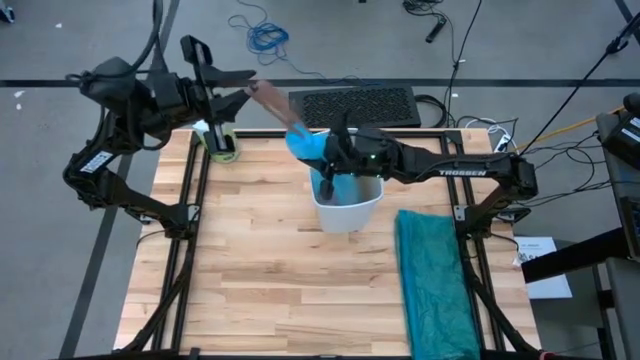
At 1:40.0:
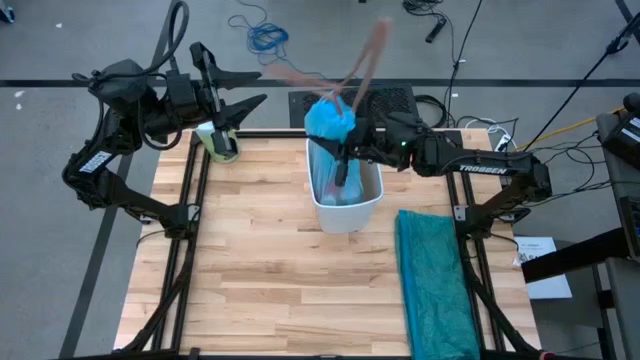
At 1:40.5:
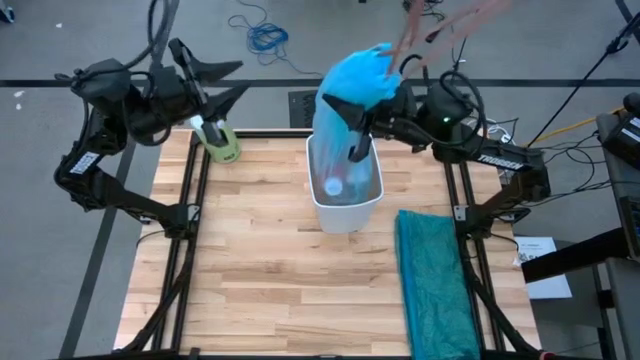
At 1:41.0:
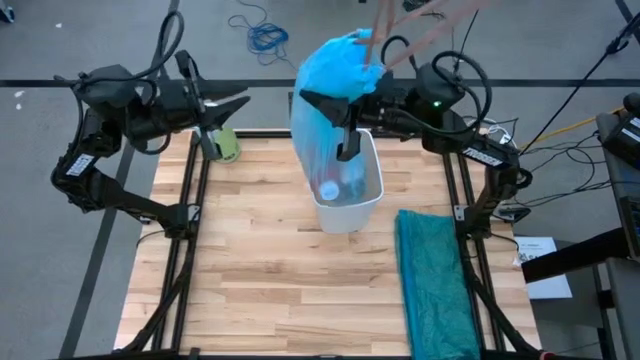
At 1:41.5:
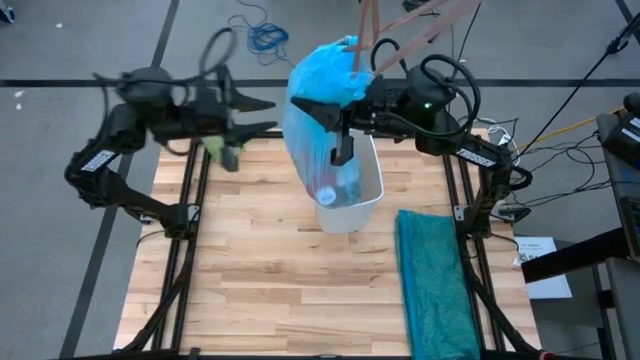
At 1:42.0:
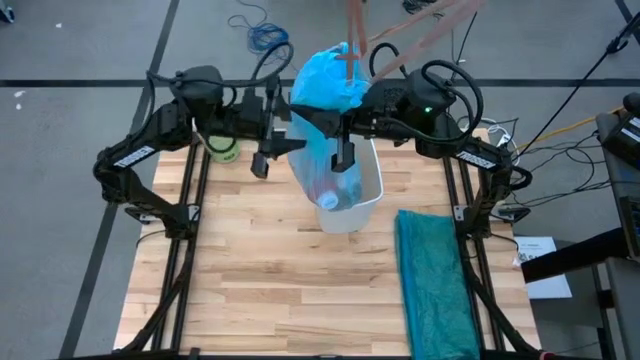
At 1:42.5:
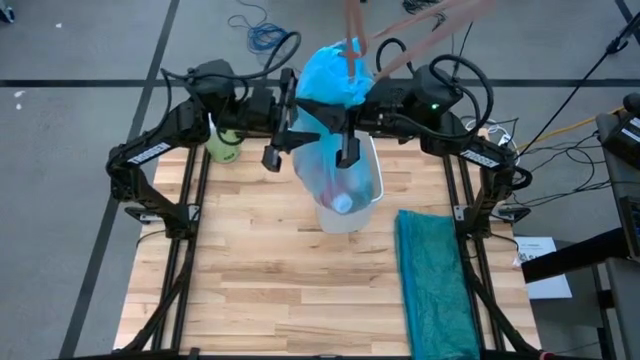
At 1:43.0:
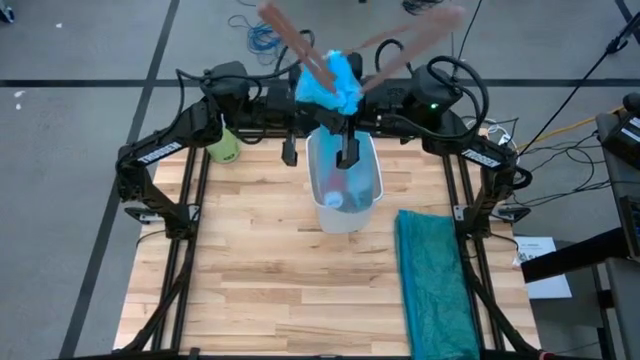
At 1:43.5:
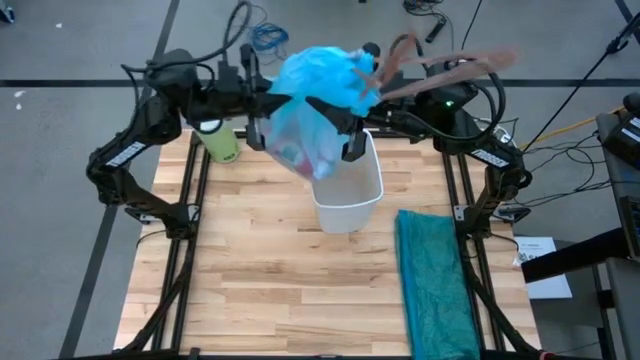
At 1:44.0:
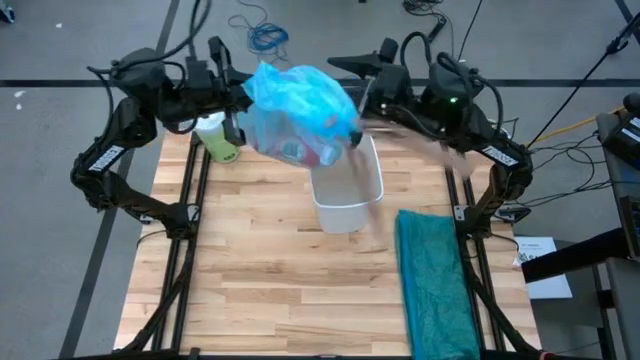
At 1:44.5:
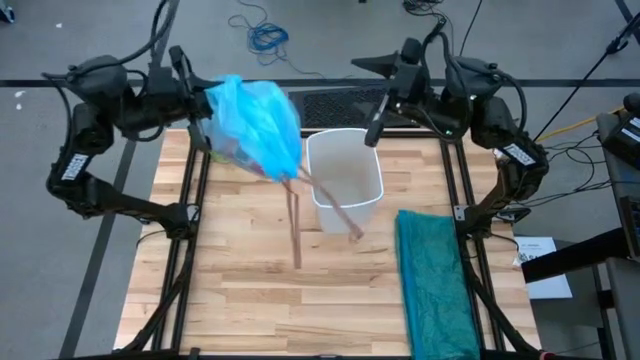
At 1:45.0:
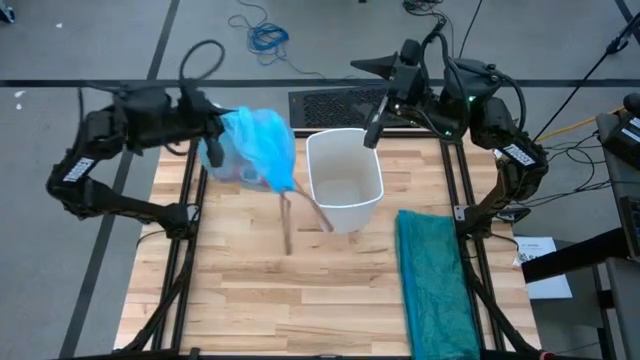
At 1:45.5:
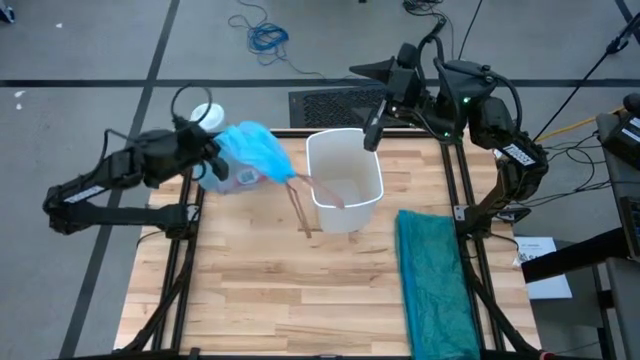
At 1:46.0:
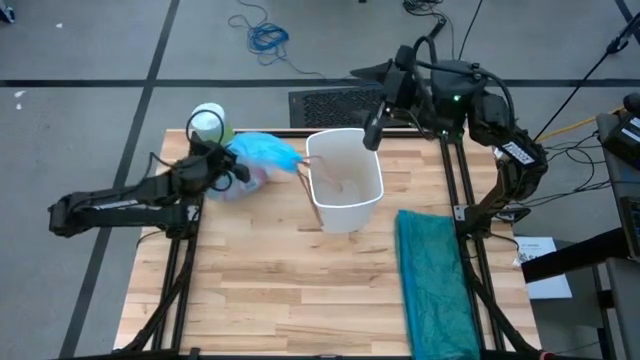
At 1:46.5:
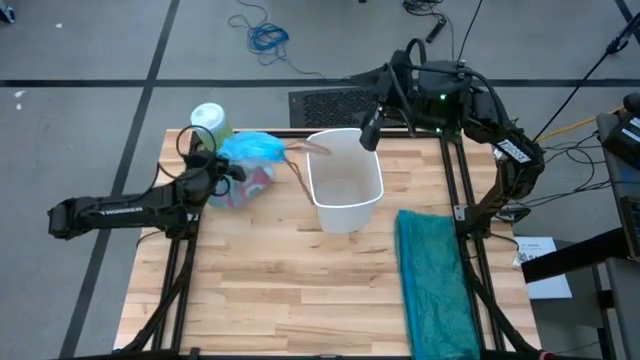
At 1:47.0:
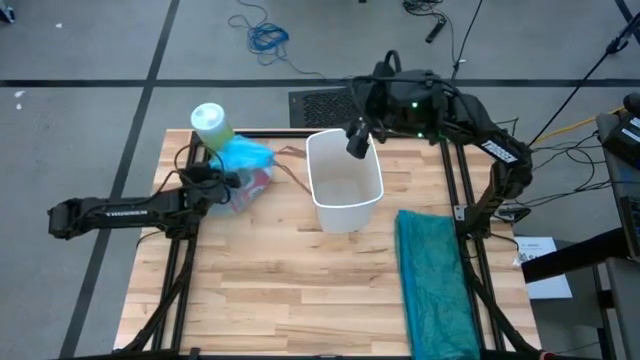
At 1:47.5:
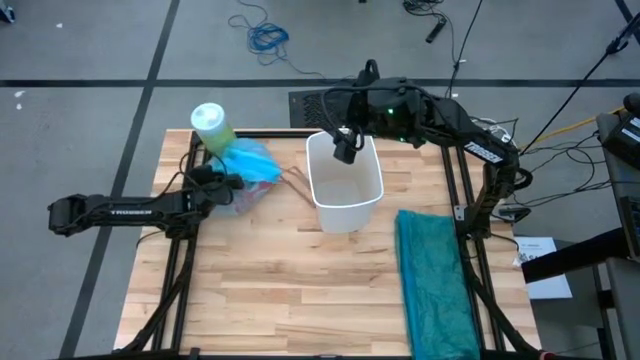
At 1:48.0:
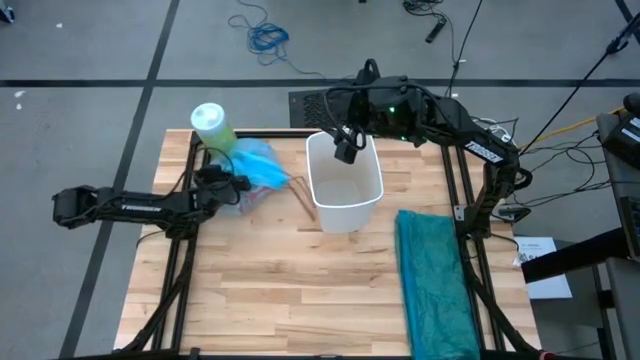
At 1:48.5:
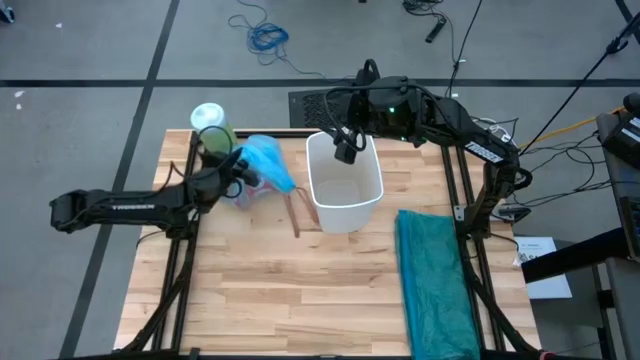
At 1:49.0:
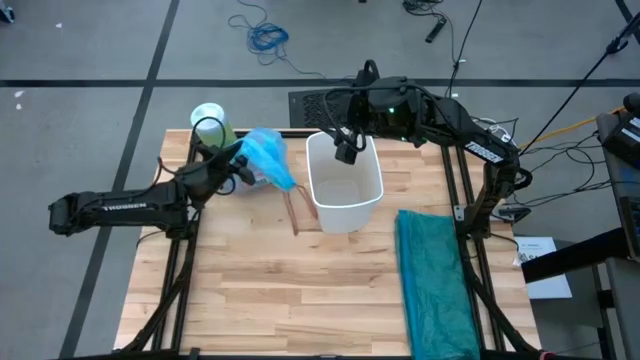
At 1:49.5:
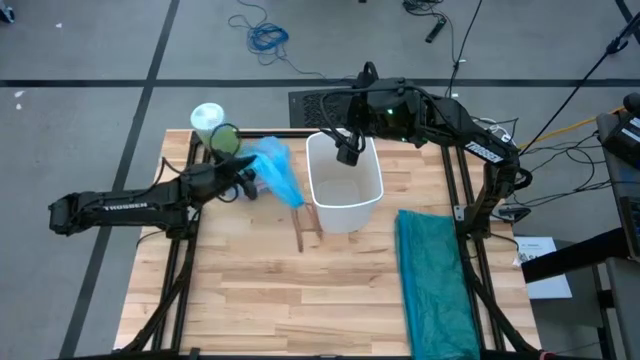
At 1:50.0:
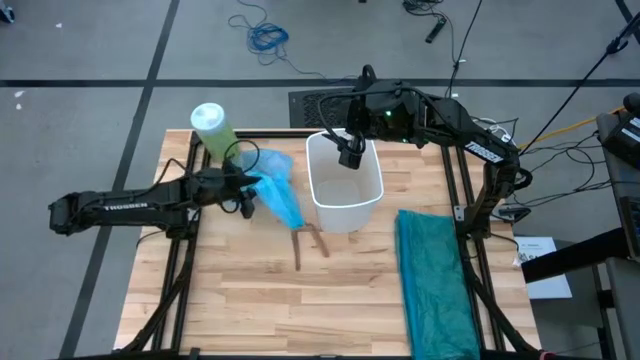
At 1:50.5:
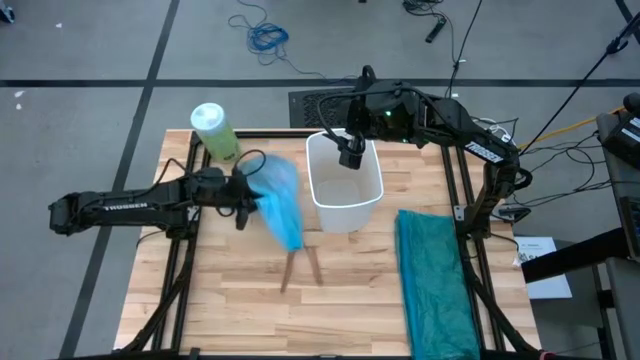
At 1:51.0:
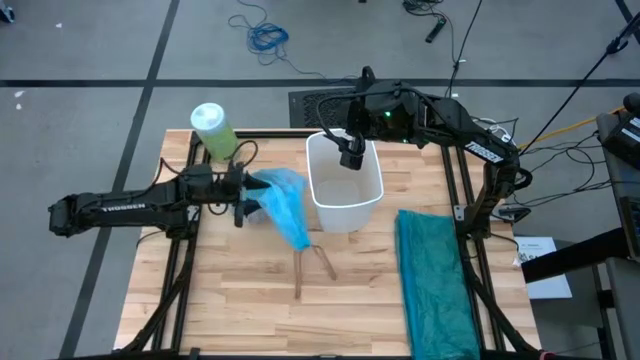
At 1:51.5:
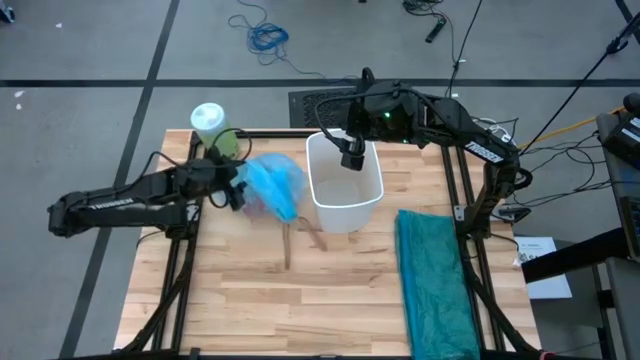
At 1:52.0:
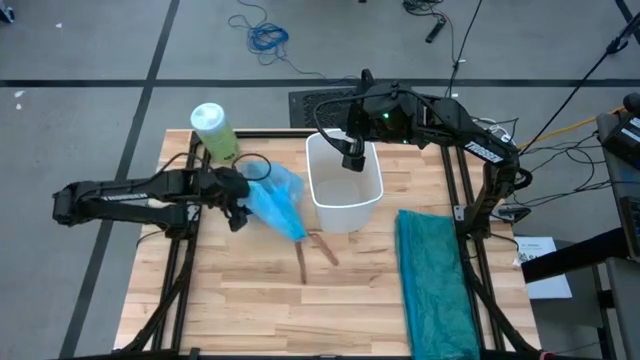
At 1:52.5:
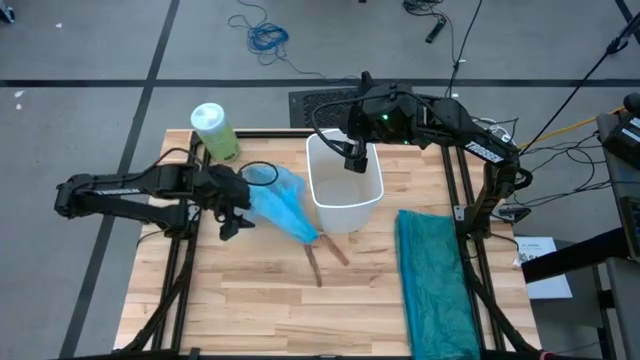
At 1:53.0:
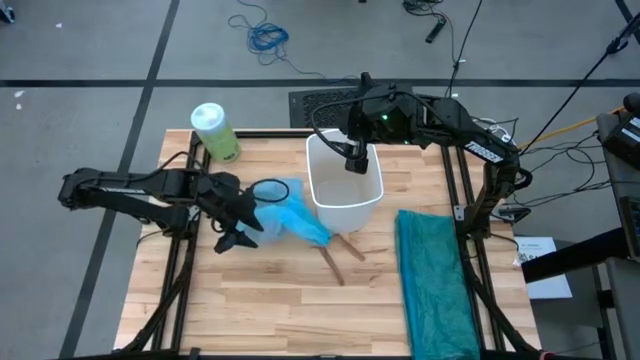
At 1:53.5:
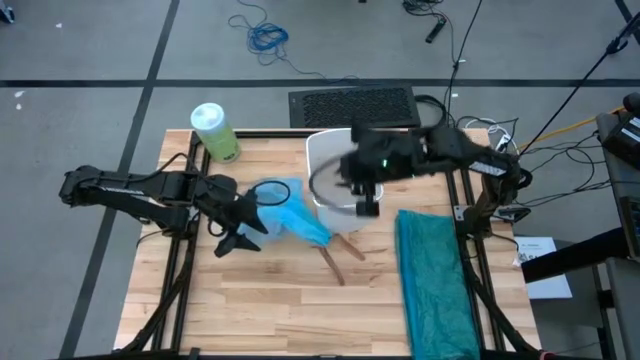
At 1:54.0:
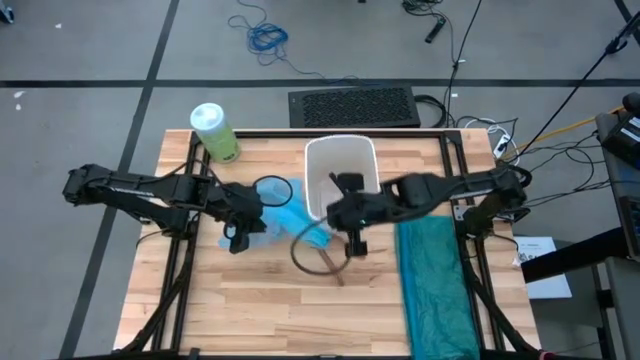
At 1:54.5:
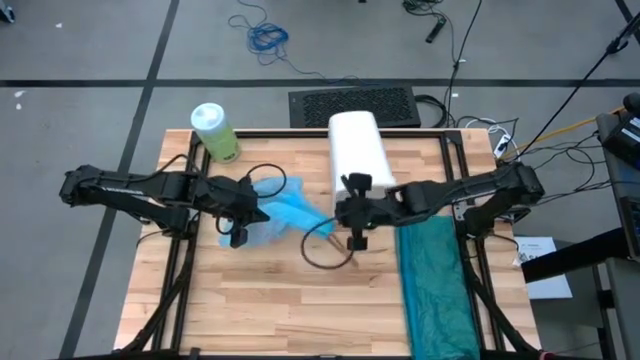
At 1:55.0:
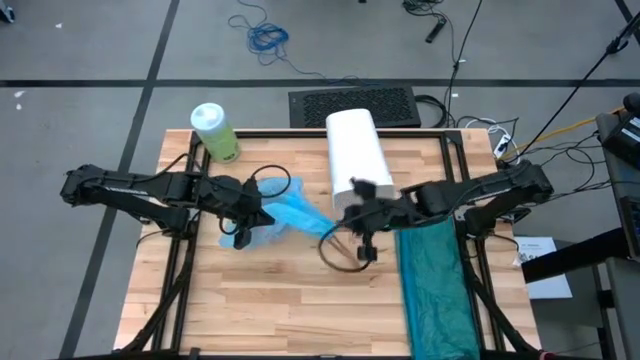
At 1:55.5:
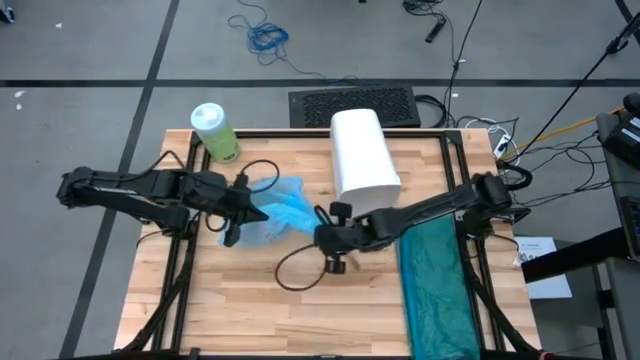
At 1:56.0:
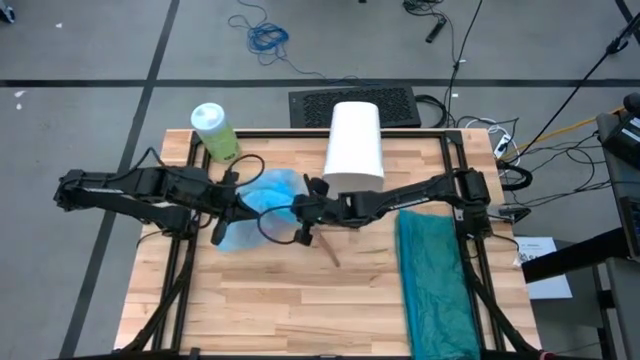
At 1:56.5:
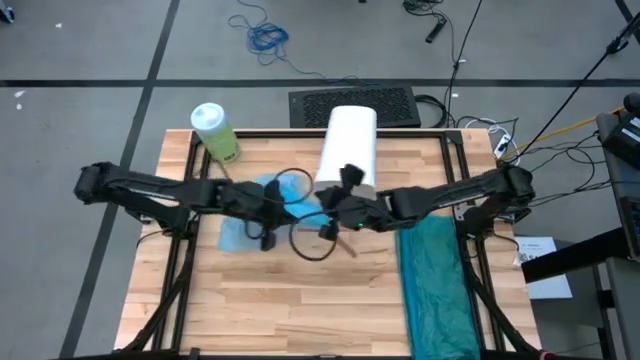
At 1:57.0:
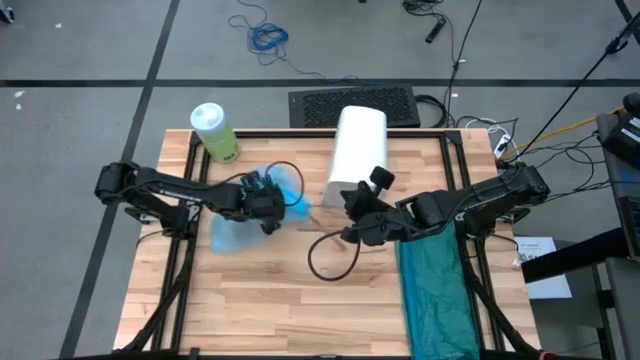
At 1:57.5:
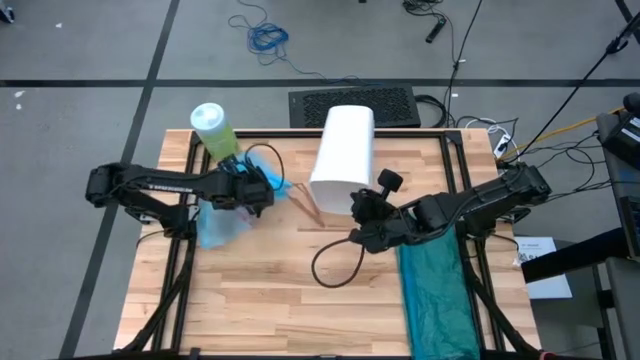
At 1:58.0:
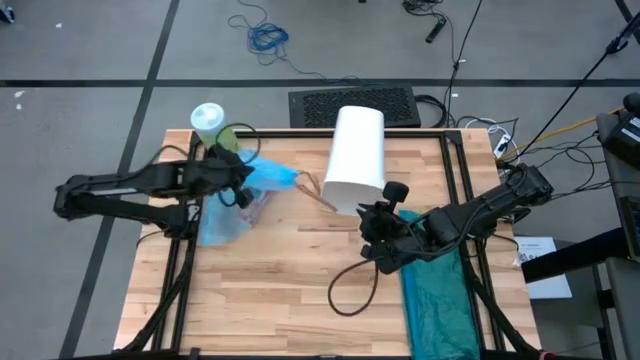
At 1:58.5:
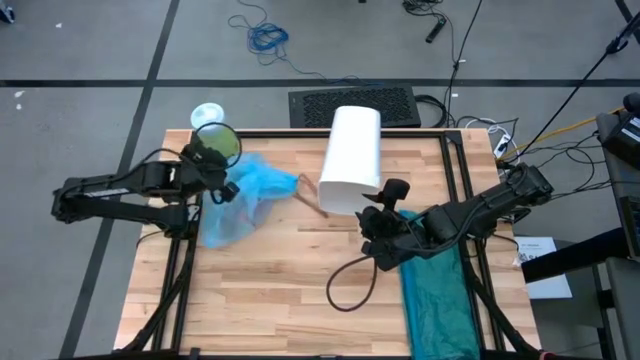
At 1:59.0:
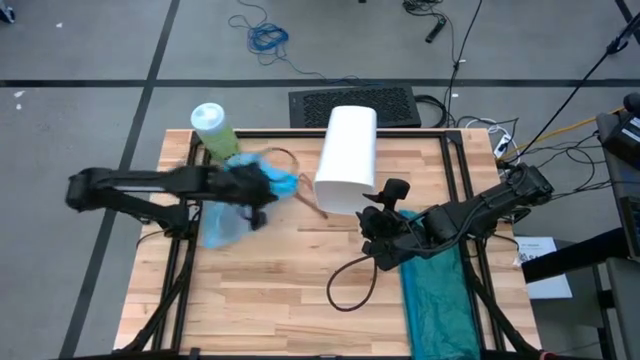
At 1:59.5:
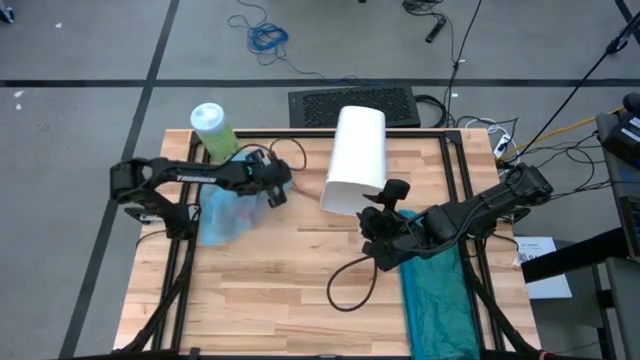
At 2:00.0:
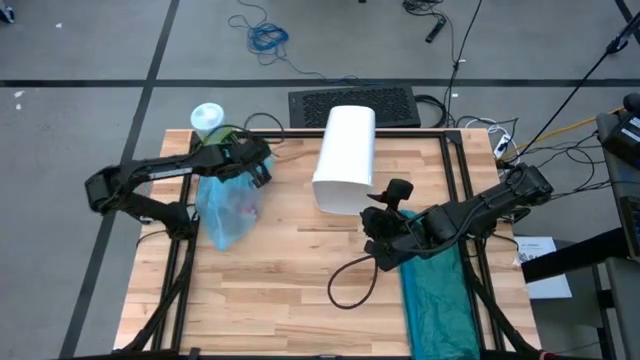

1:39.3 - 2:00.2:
Task: place trash/remove bag and relplace
Remove the plastic bag from the white trash bin

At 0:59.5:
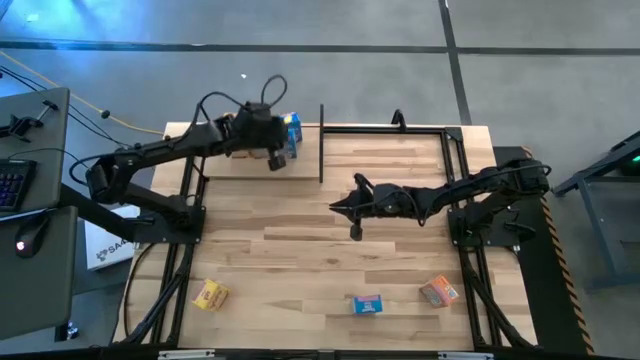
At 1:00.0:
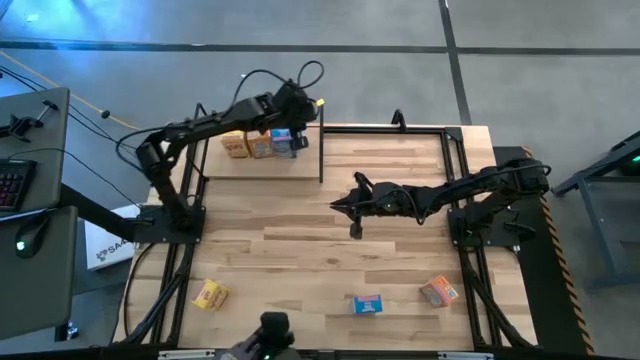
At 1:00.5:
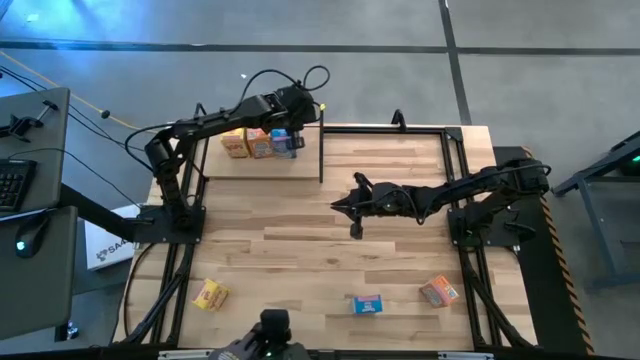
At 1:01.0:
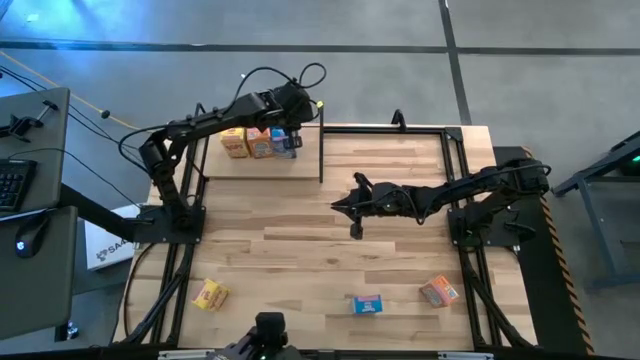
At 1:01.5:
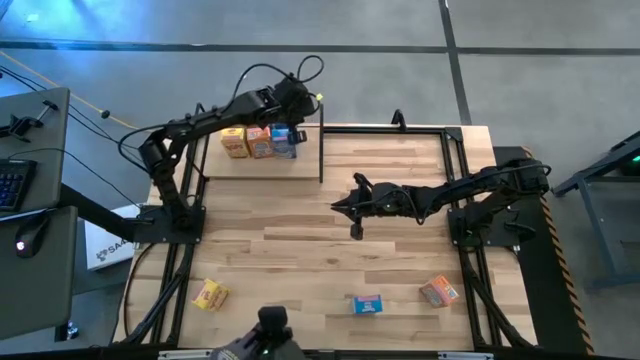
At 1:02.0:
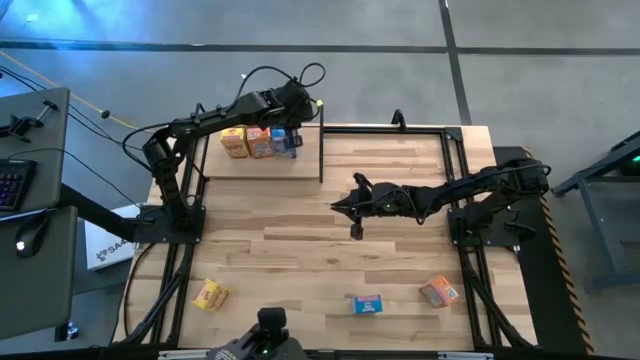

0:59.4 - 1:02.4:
Task: Stack cereal on shelf
Adjust the blue cereal box on the shelf
